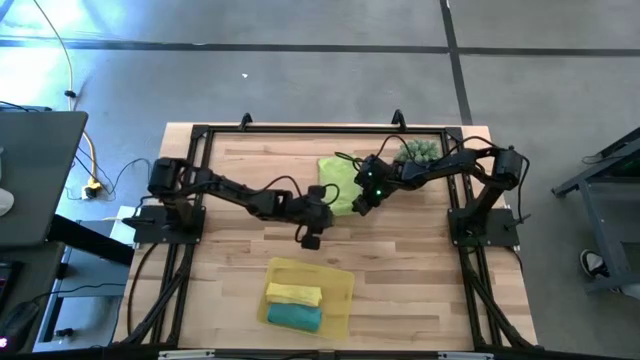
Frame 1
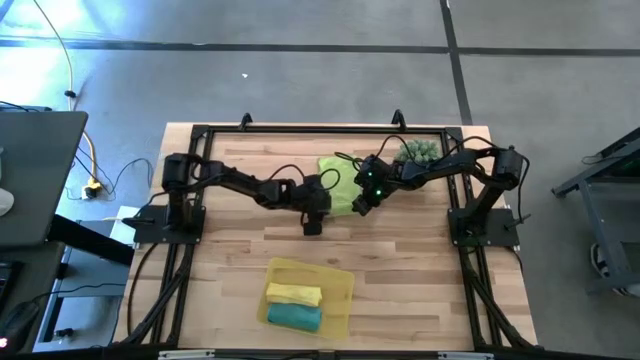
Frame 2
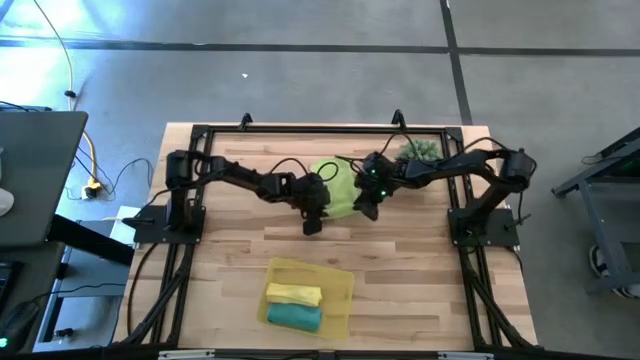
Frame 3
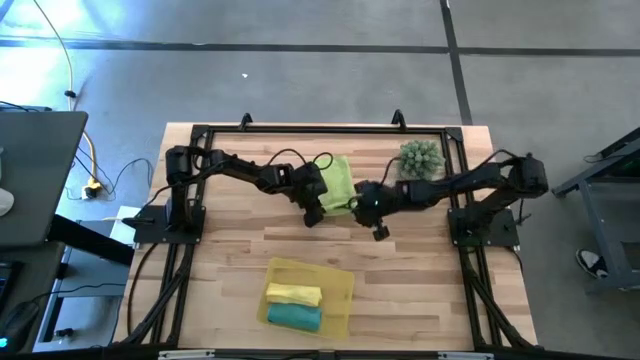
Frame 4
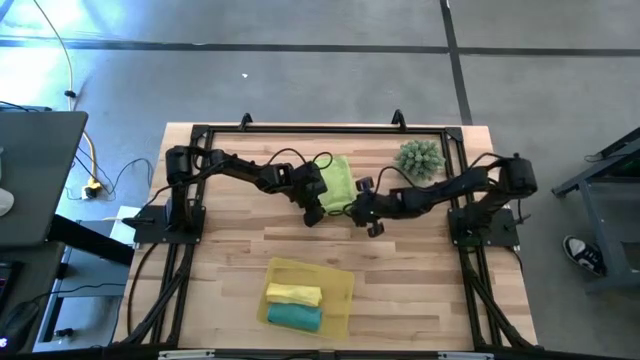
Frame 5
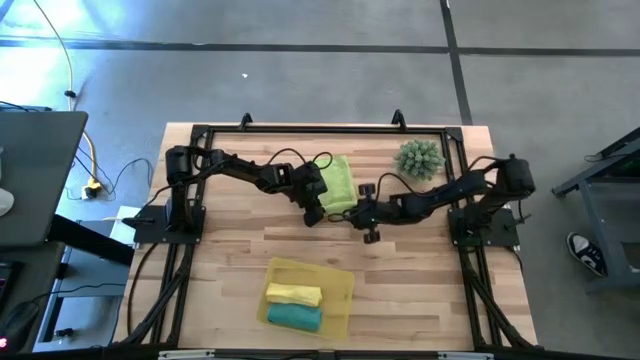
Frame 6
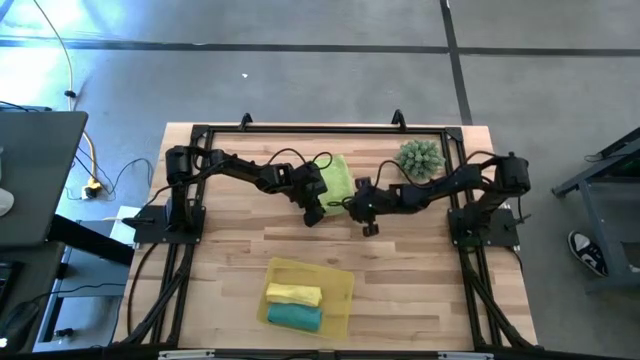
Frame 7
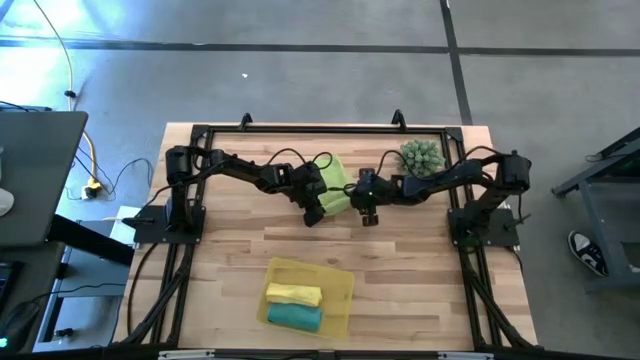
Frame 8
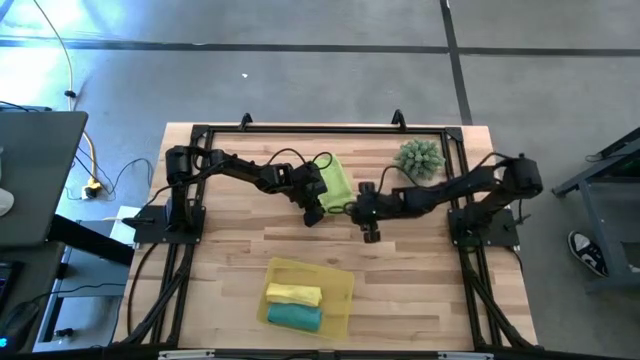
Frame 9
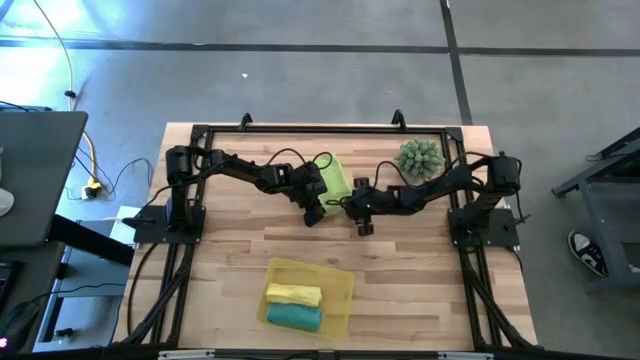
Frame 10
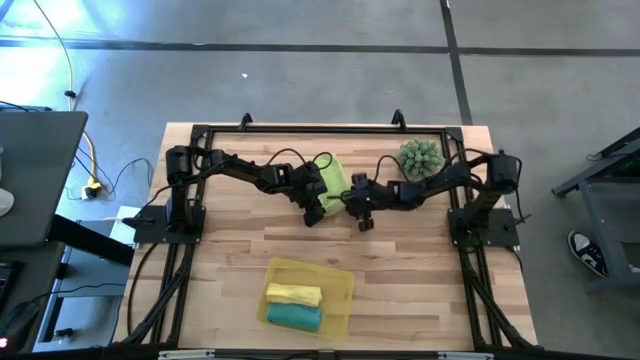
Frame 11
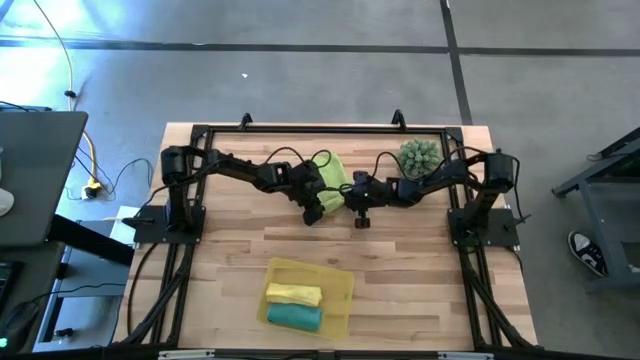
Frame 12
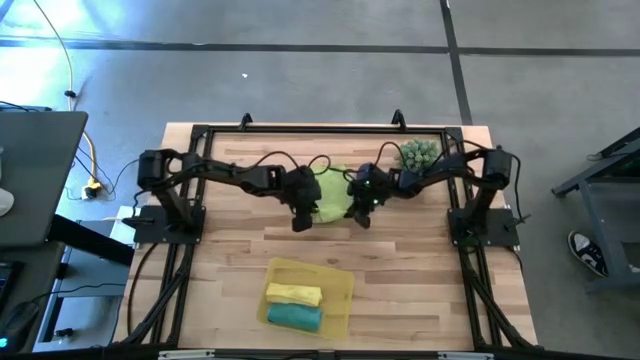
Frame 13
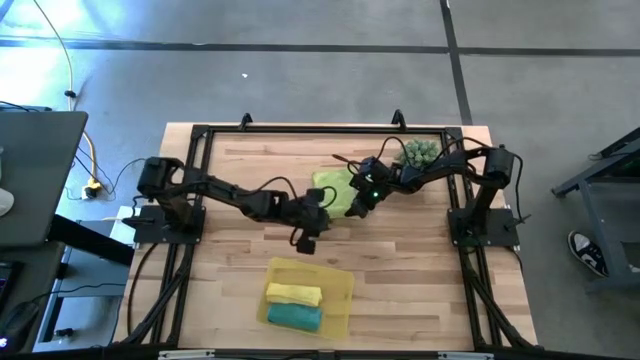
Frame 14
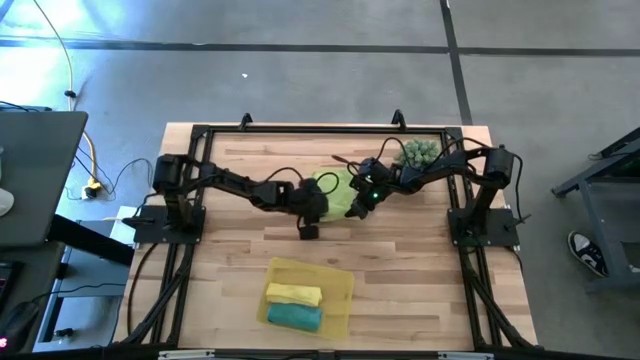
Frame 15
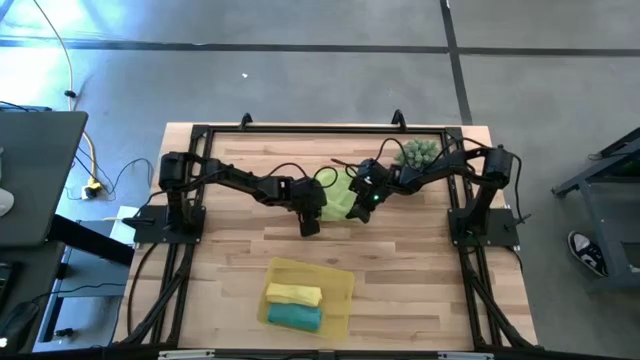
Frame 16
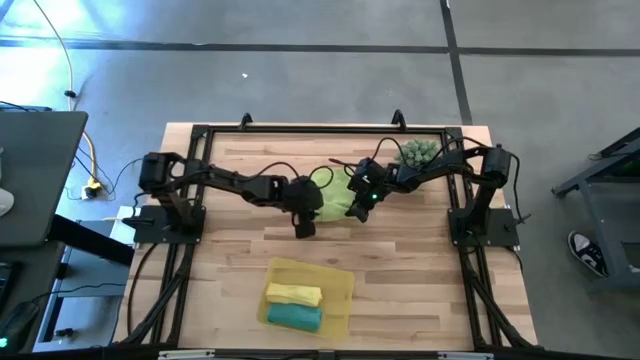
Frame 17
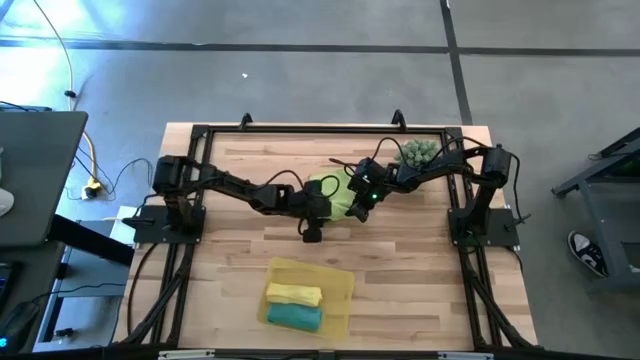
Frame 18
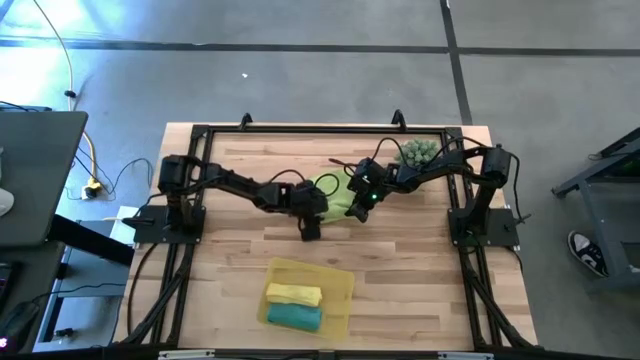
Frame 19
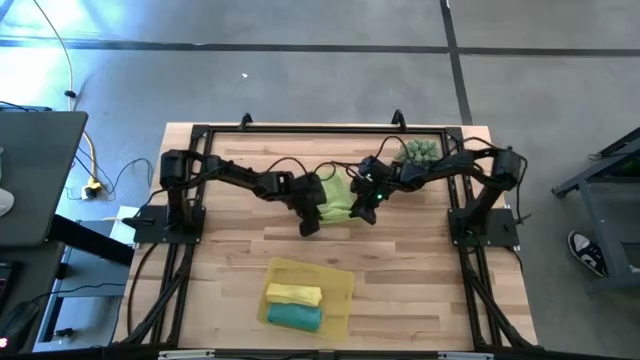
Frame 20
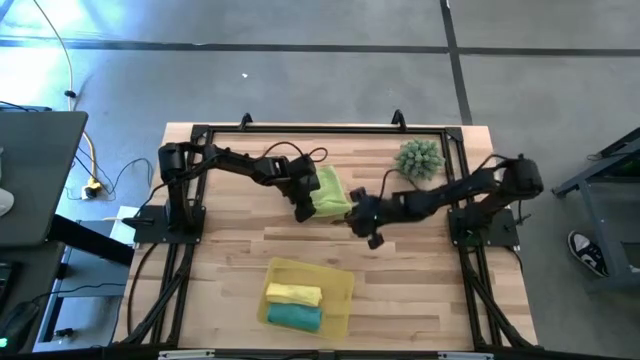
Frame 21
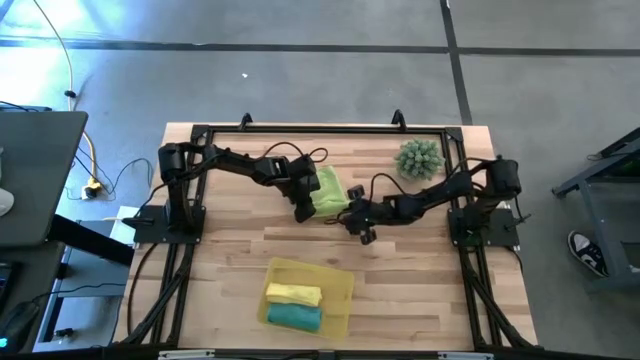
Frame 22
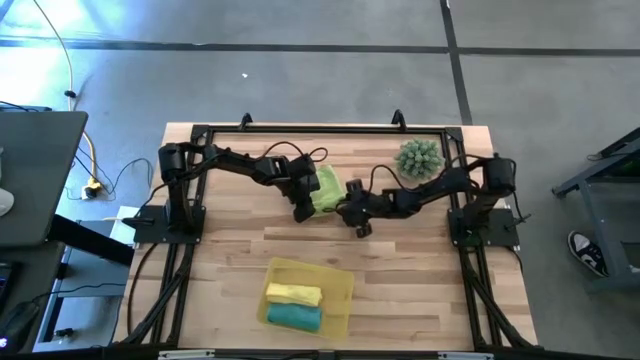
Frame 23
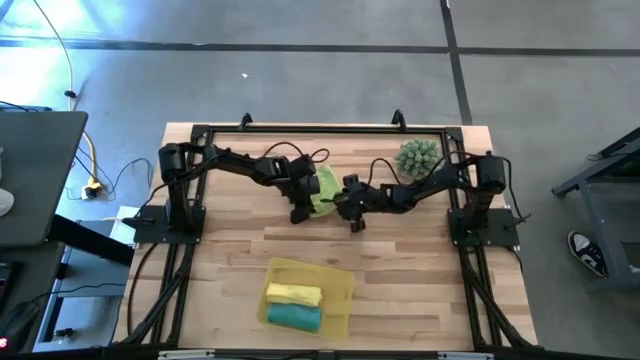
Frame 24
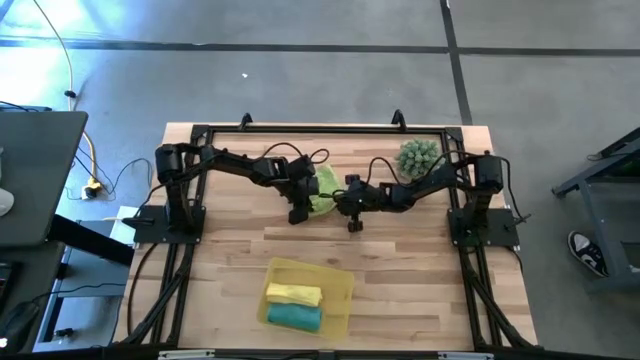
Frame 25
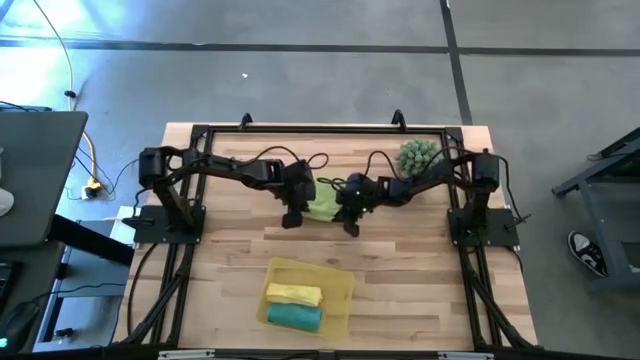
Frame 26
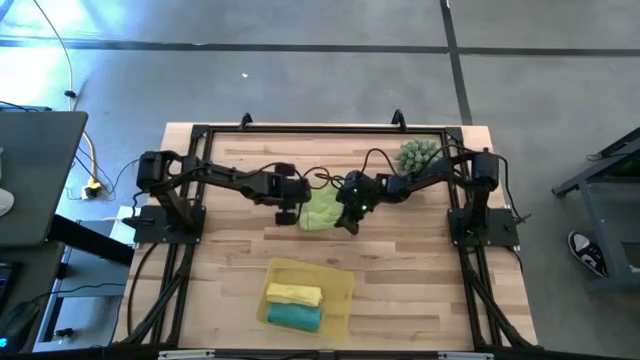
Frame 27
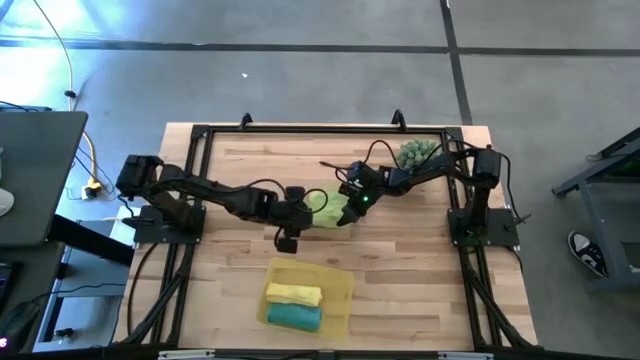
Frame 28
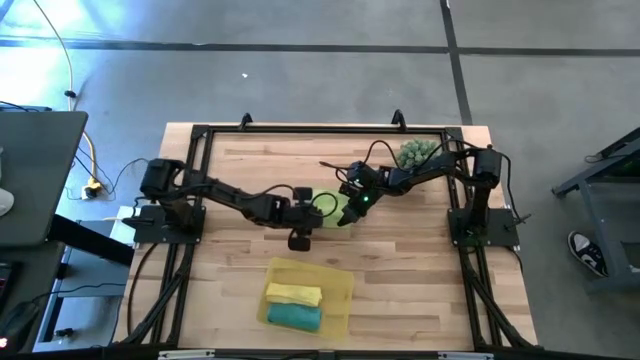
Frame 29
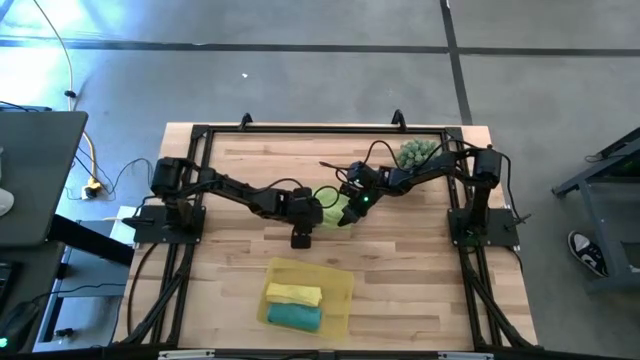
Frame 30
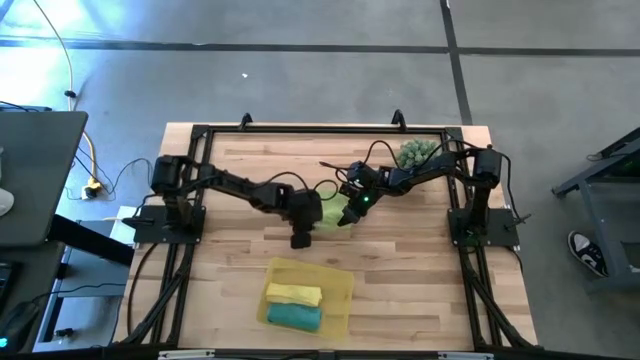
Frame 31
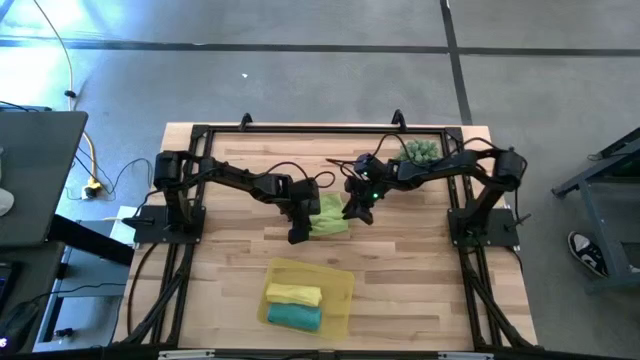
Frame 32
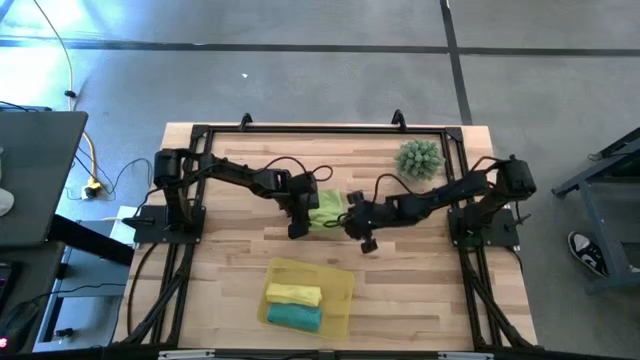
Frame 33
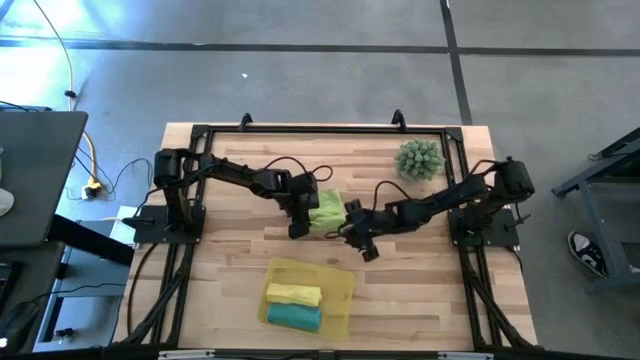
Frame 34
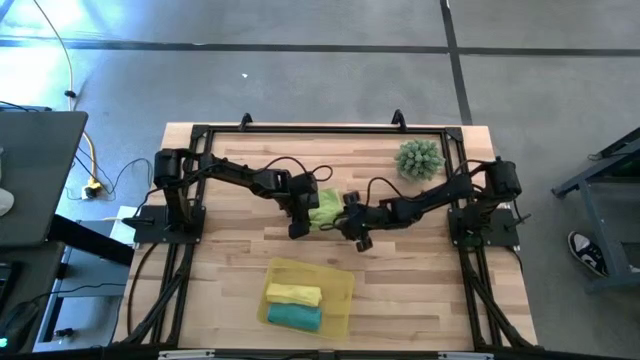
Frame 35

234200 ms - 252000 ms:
Task: Roll microfiber towels into tight, uniform cylinder then place into a basket
Roll the green towel

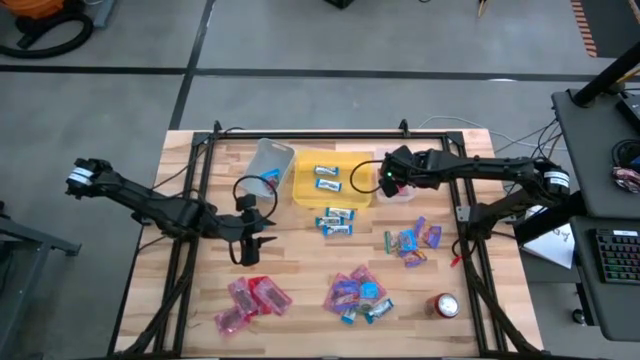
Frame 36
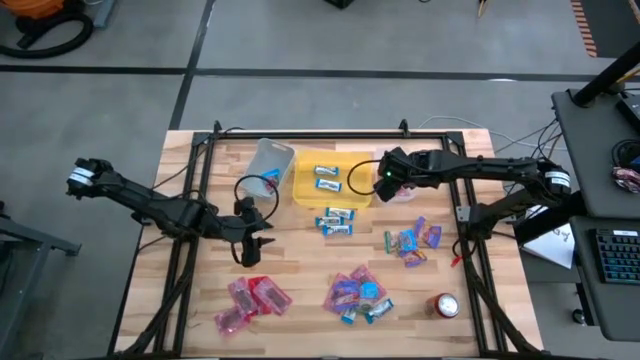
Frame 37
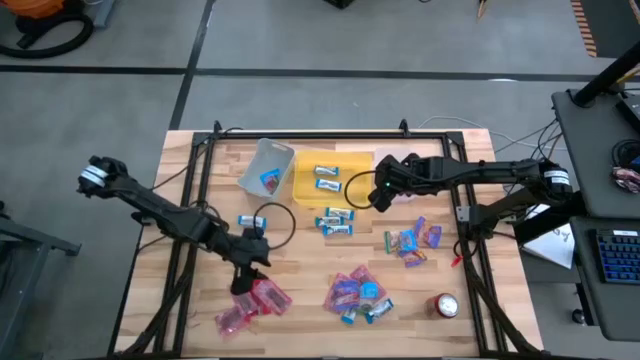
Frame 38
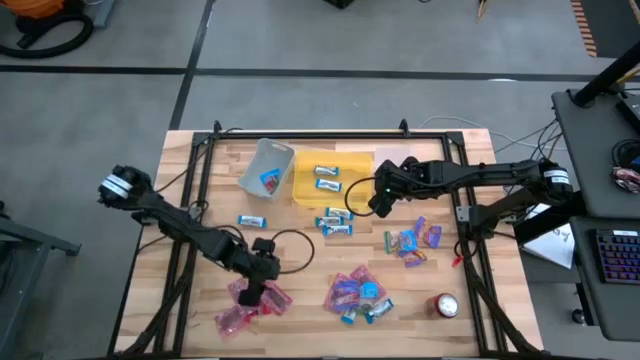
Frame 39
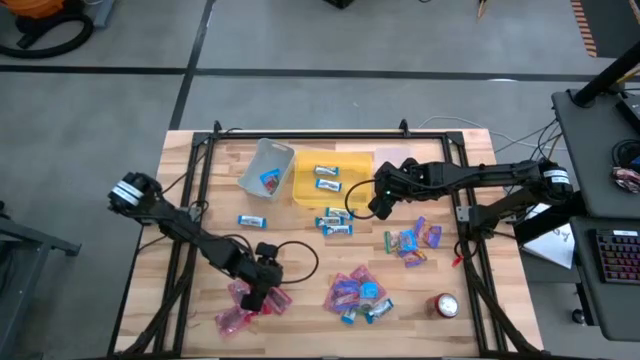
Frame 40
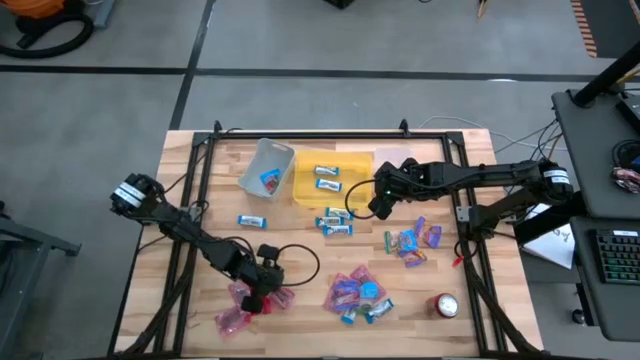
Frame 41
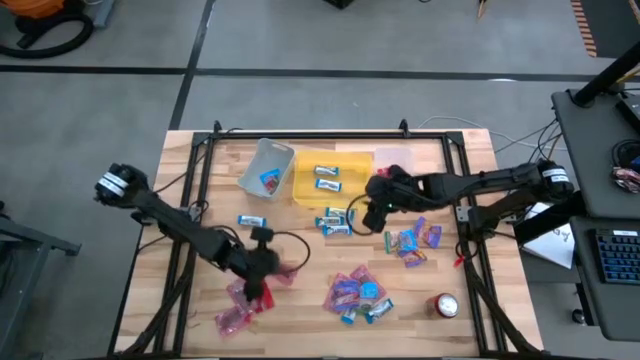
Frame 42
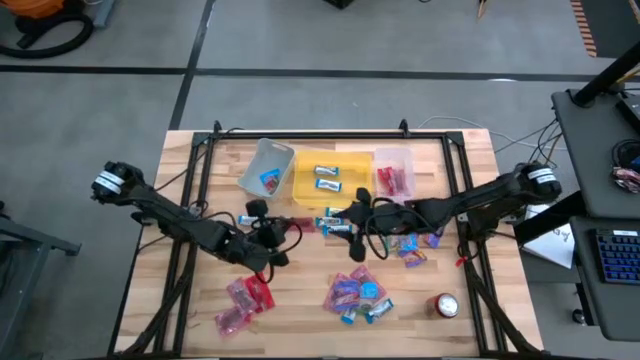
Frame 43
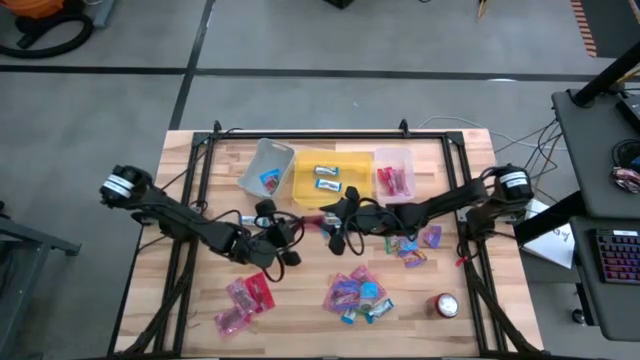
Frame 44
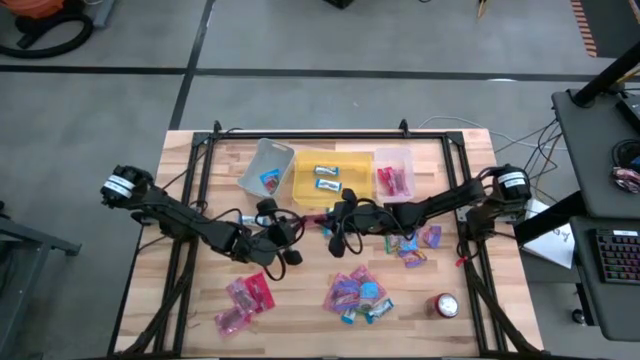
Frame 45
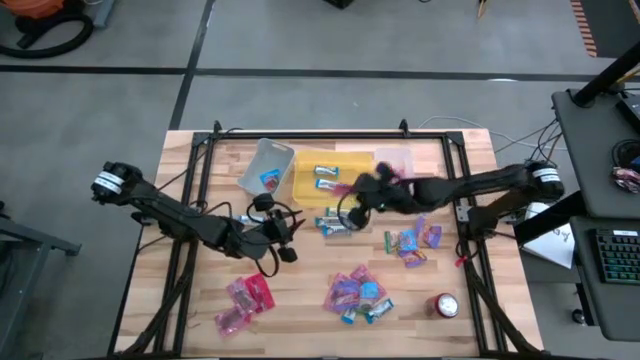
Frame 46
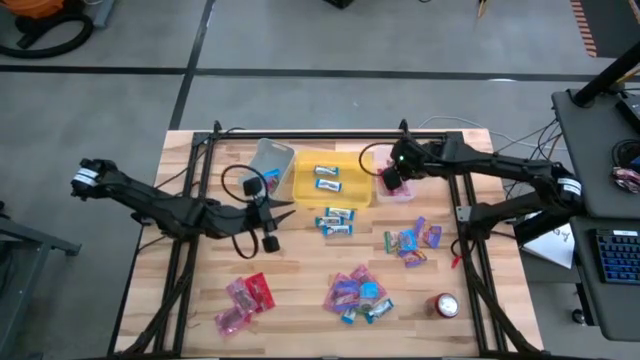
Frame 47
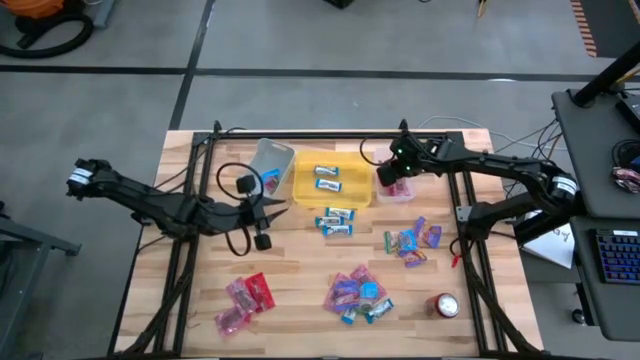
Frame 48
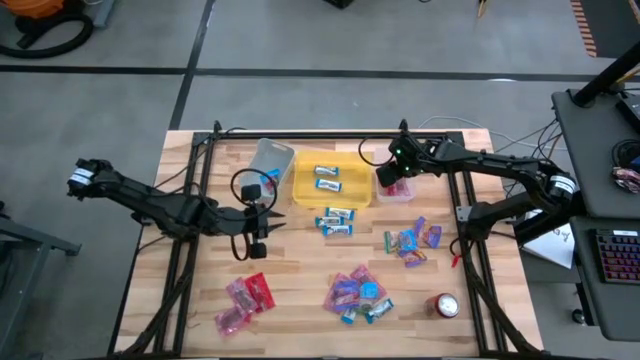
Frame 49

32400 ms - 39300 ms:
Task: Sort candy
Put the red candy into the transparent bin
